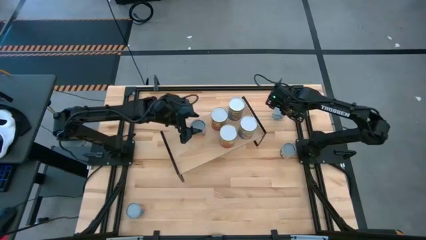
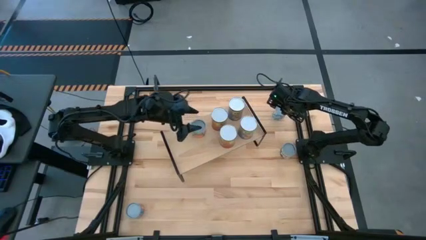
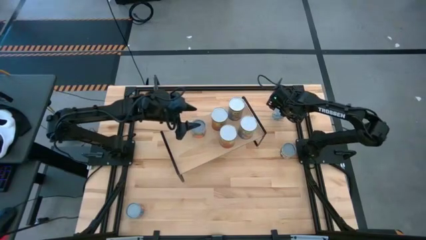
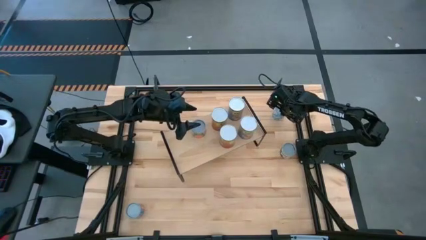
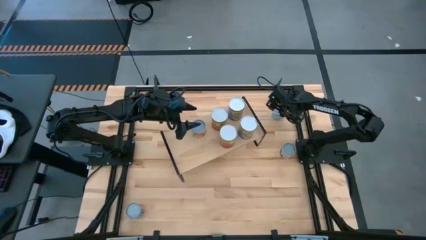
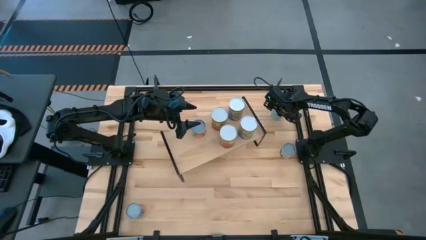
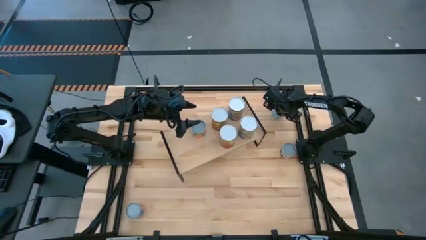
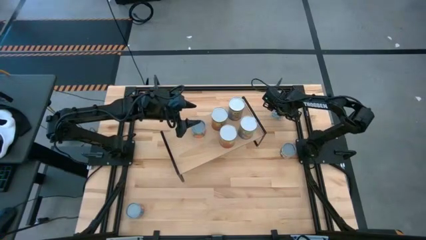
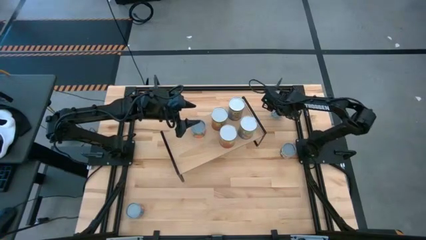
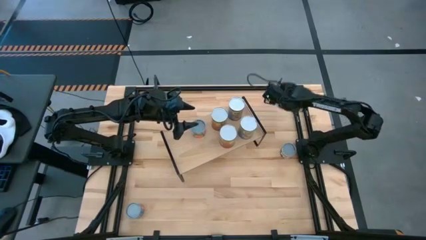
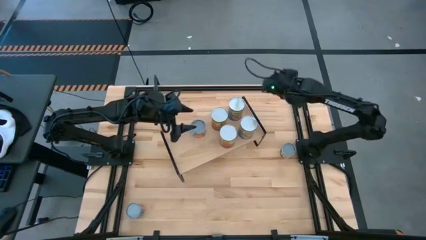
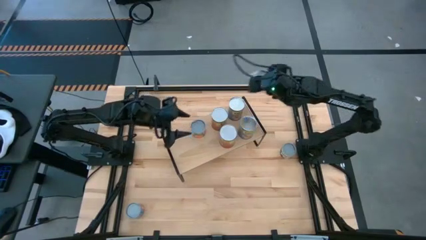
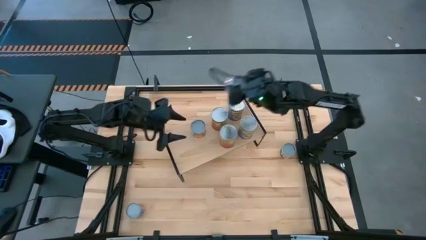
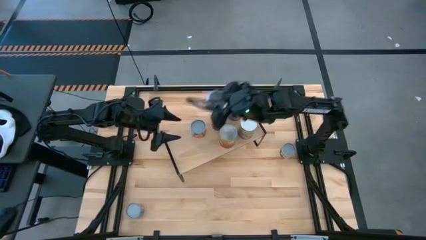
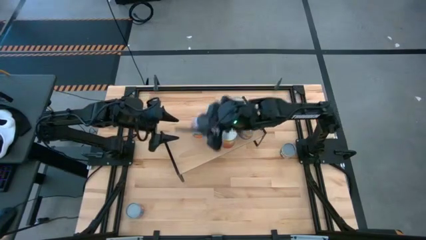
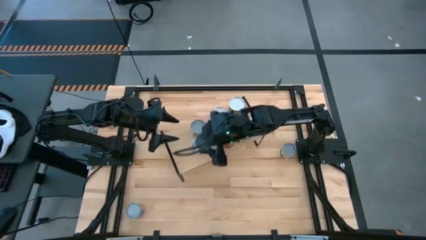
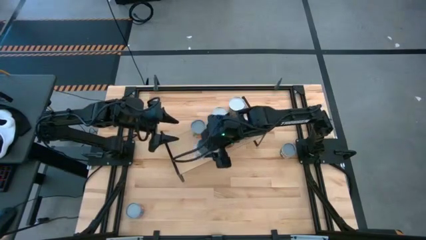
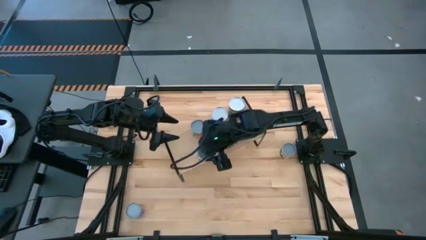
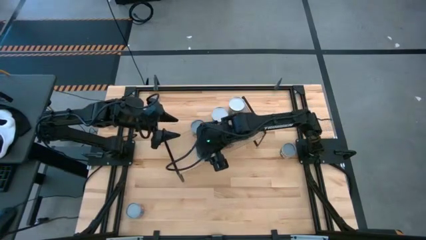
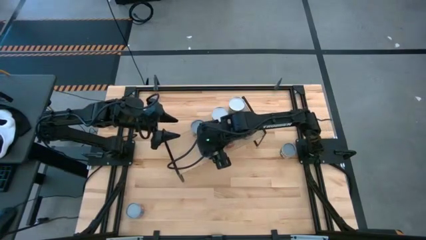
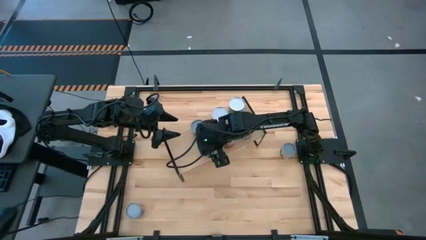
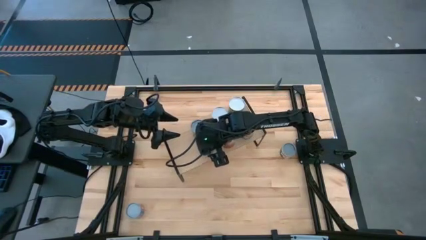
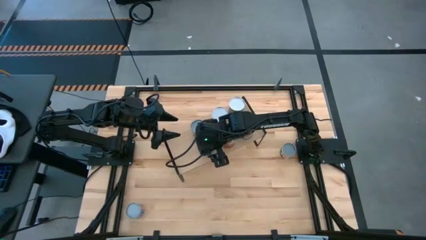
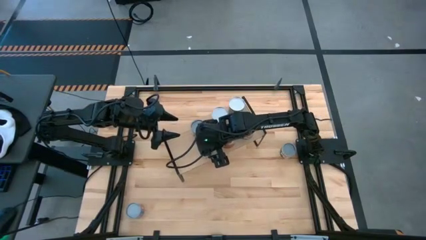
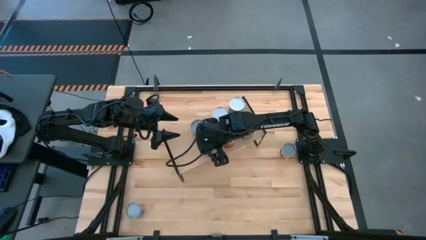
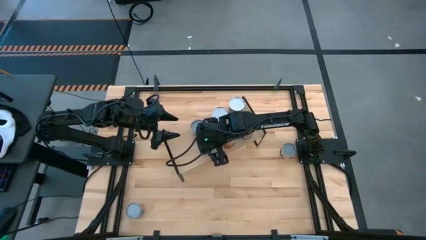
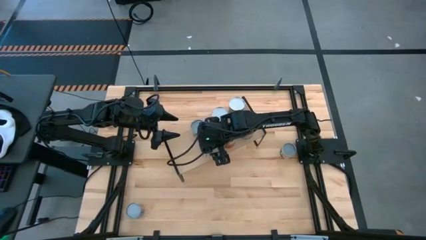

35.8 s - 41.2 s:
Task: Pick and place cans onto a shelf
Put the small canned carrot on the shelf

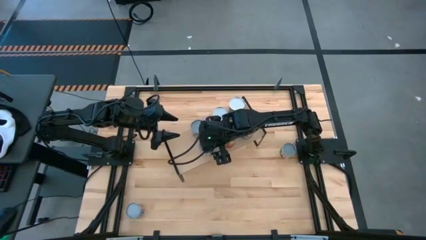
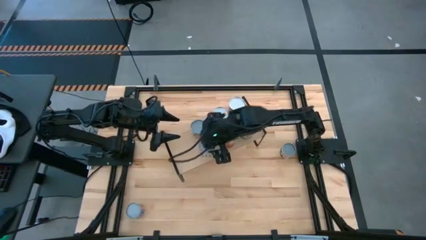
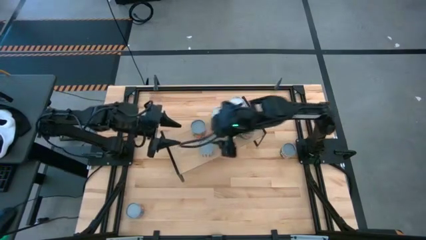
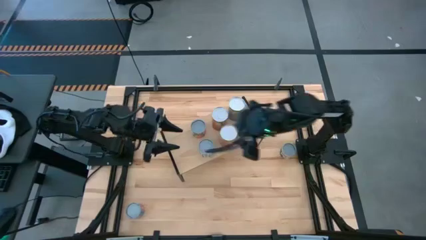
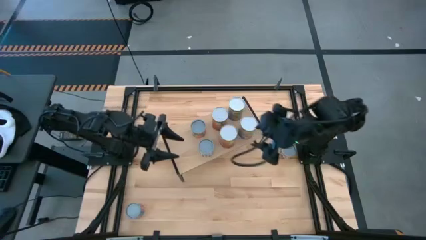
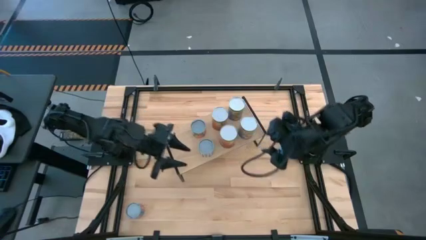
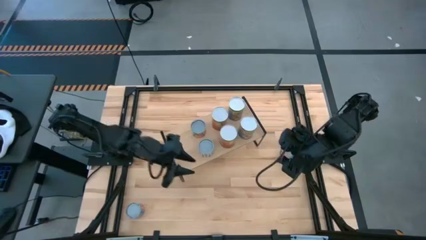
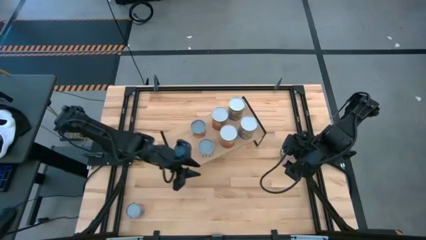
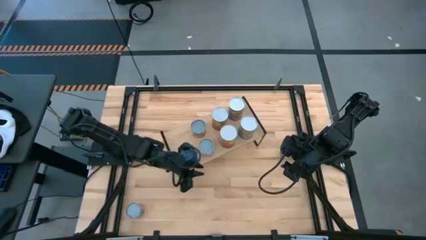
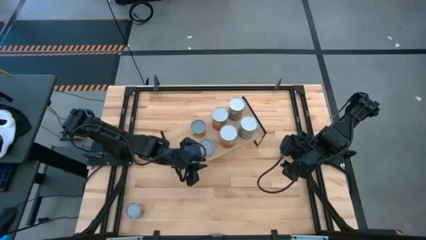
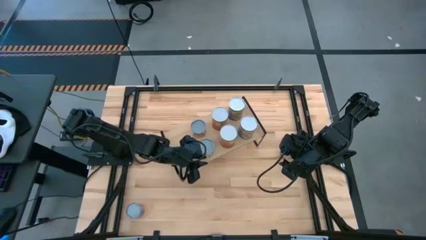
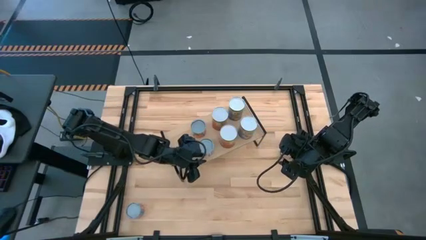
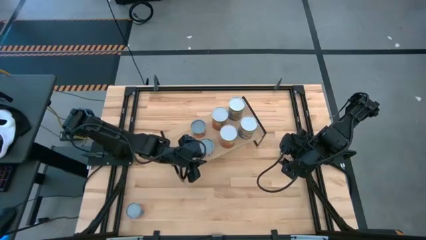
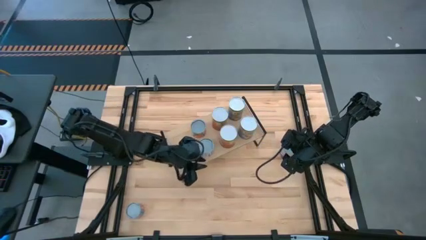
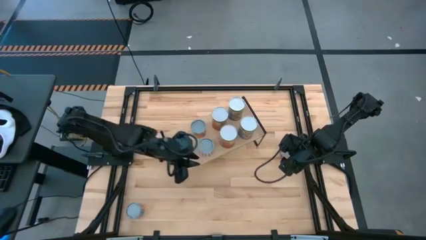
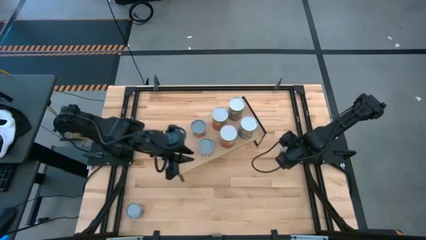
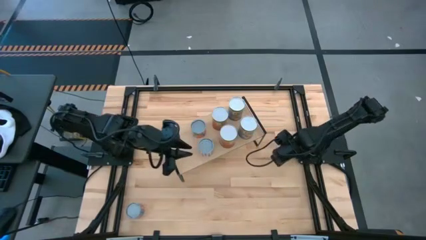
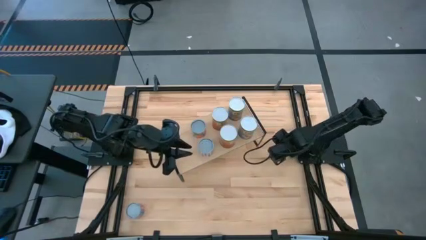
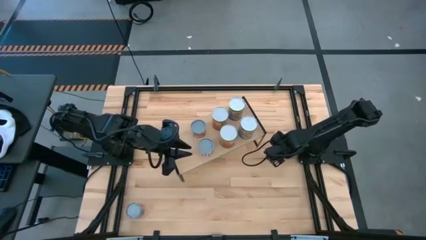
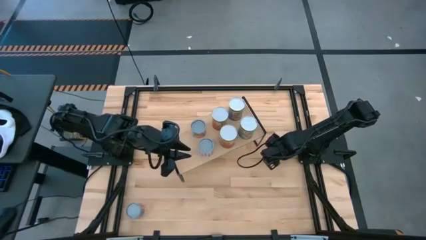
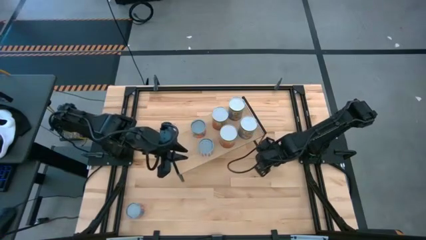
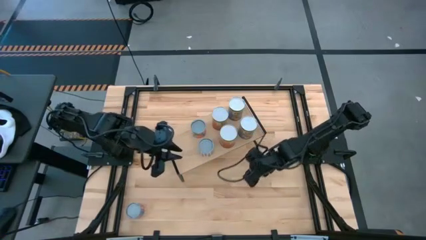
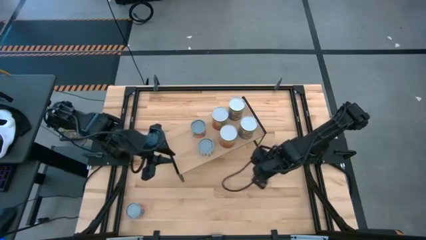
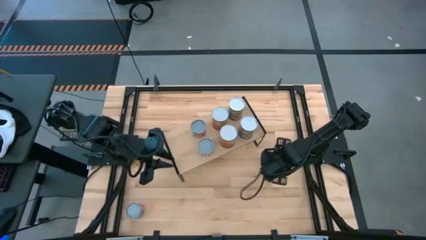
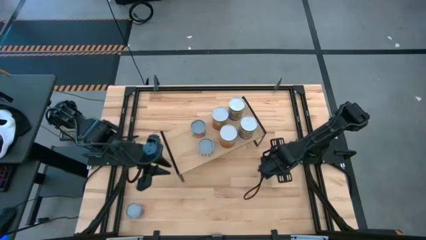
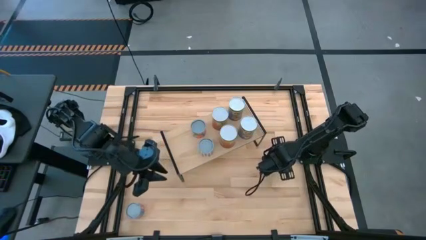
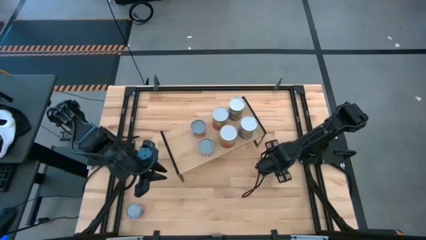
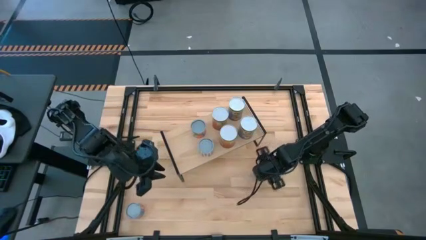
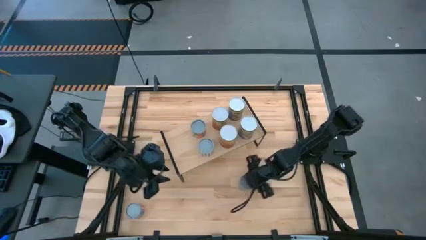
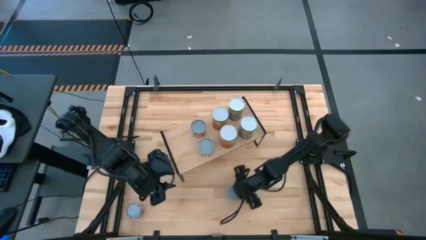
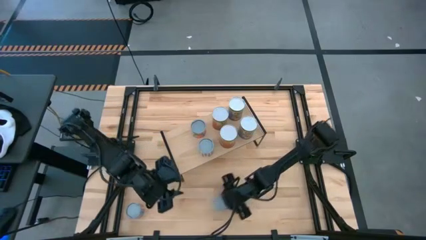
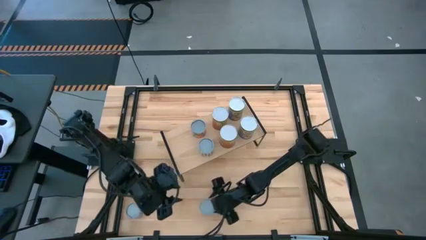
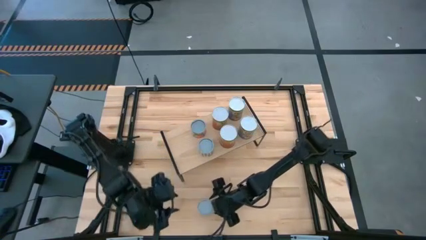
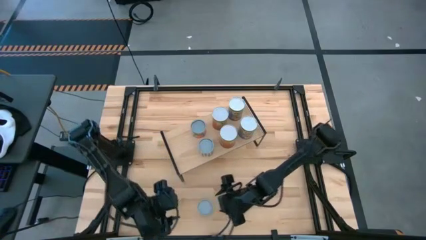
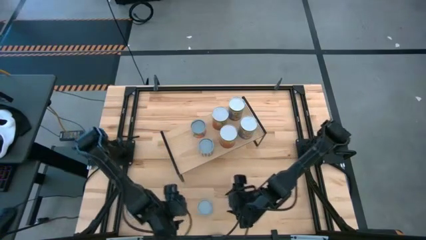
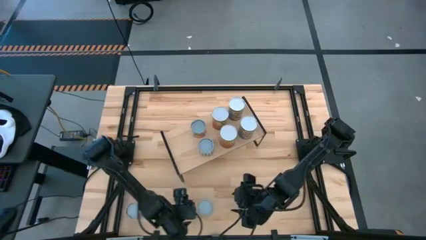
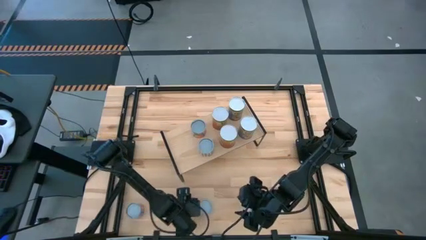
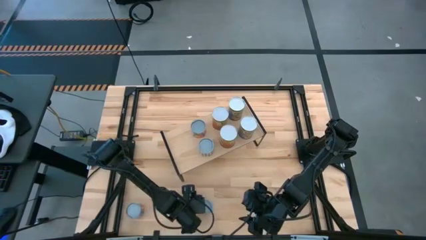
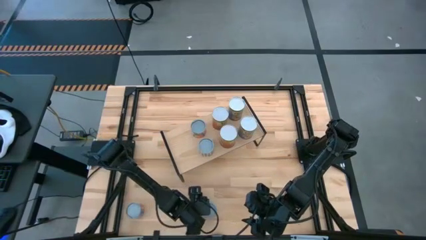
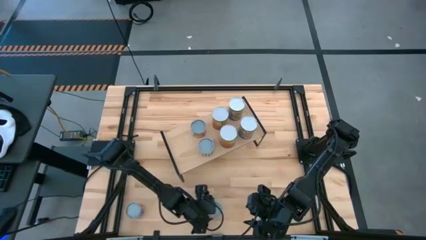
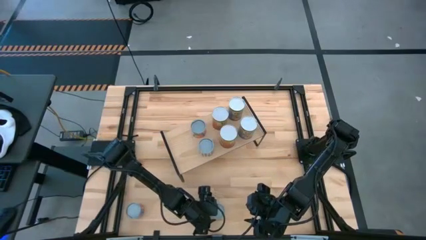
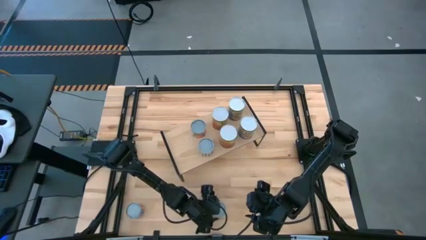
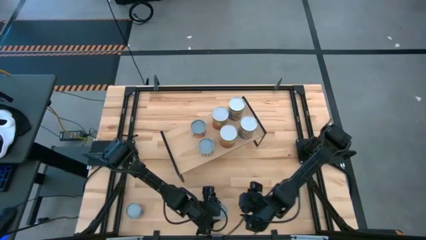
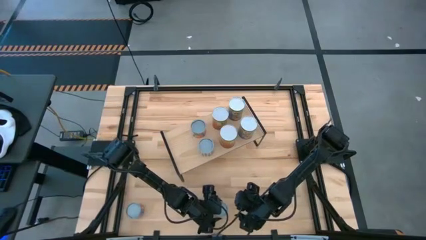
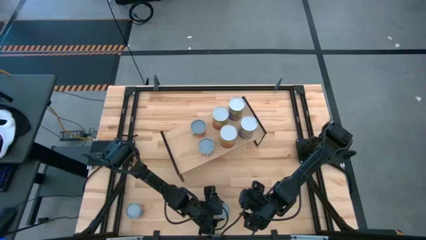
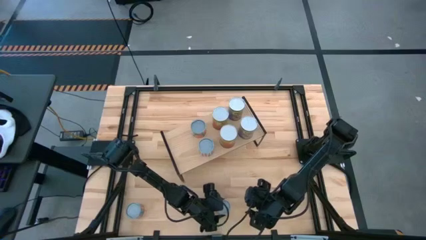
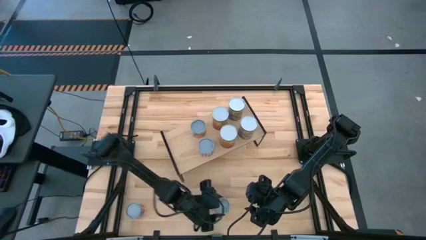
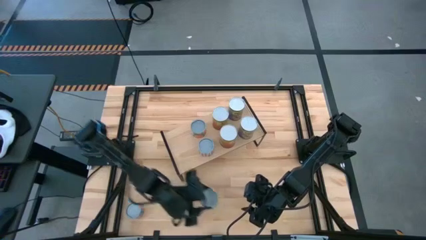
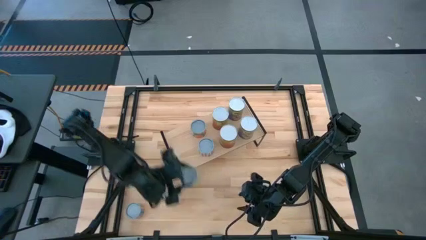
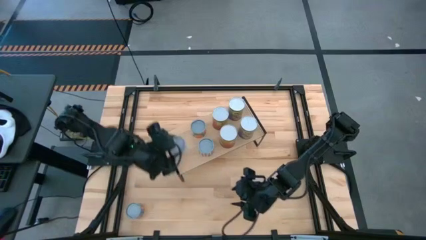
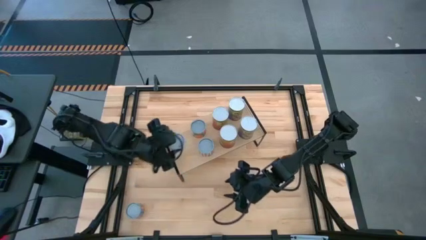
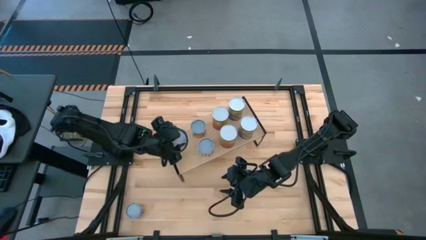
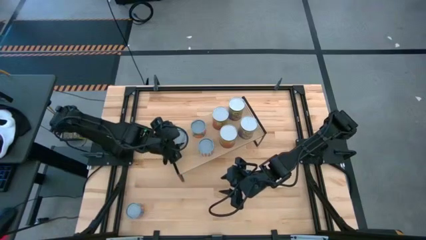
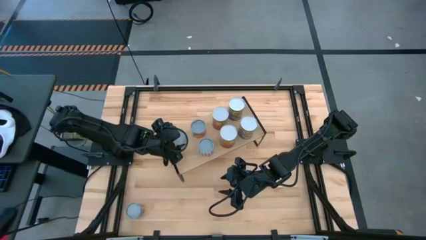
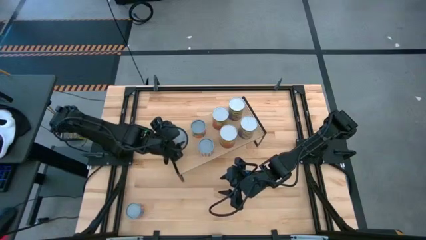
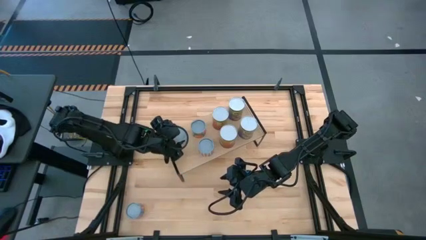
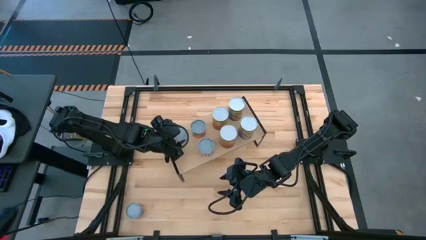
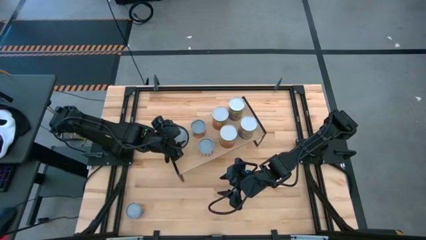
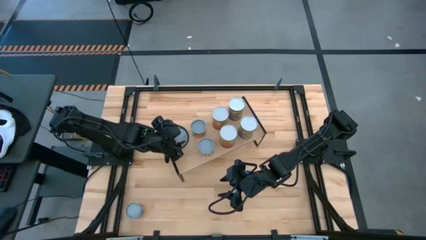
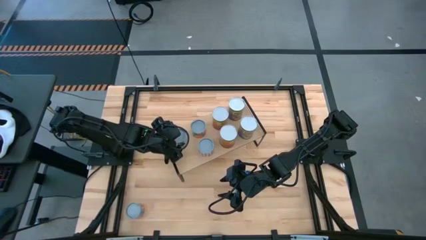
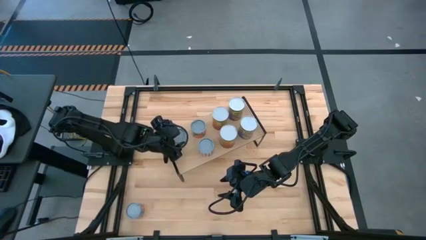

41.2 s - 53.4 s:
Put the small canned peas on the shelf
